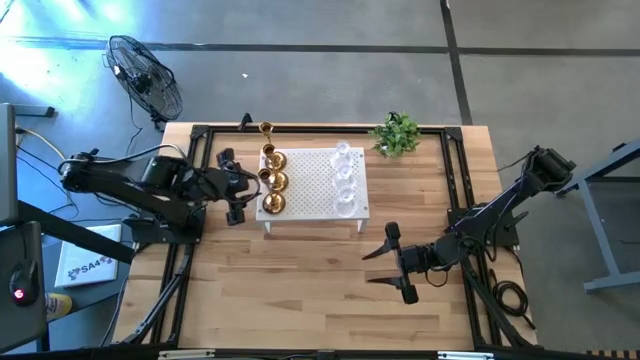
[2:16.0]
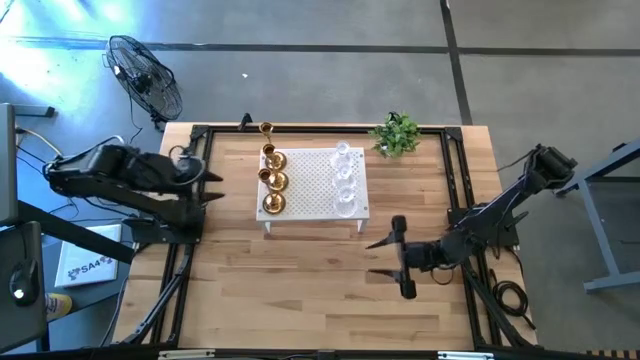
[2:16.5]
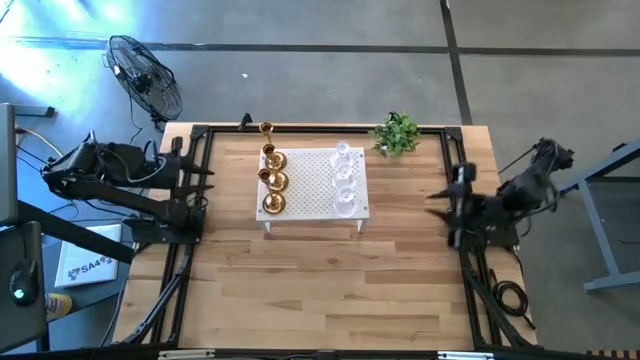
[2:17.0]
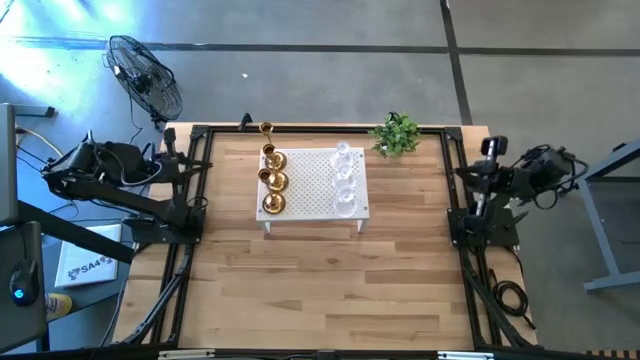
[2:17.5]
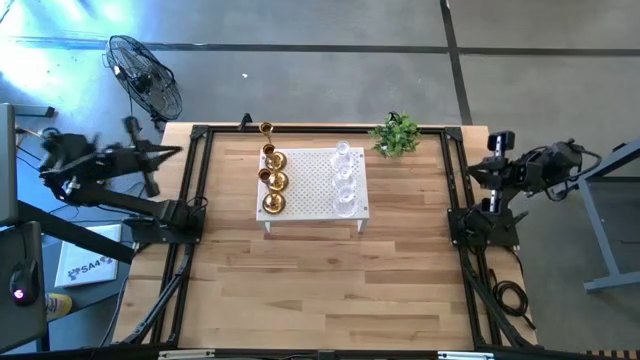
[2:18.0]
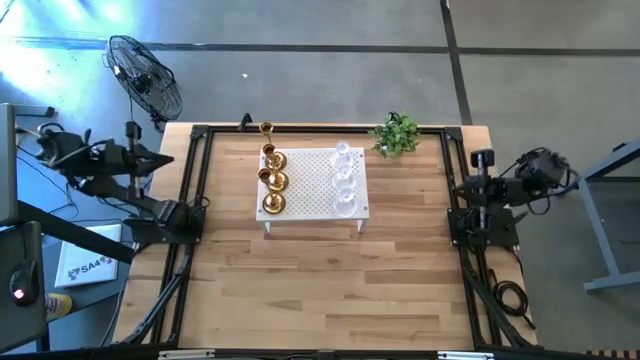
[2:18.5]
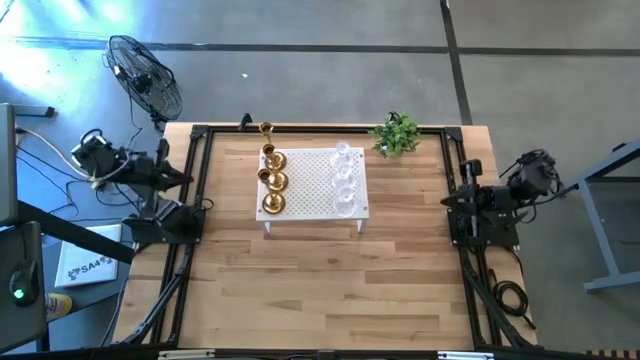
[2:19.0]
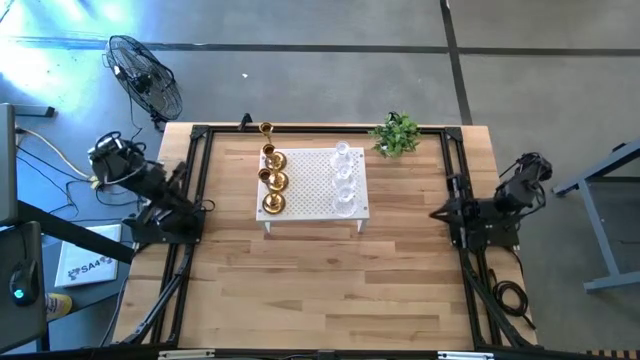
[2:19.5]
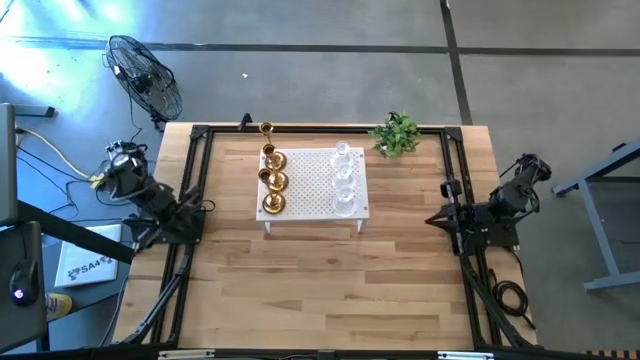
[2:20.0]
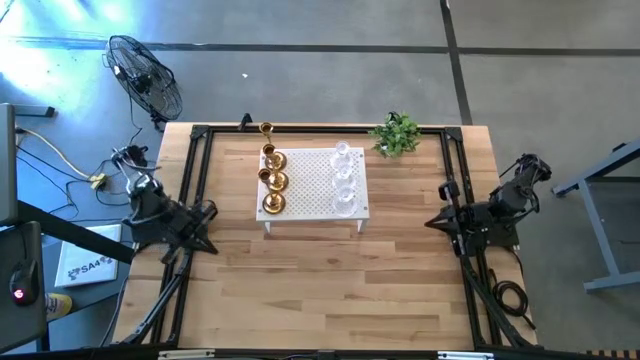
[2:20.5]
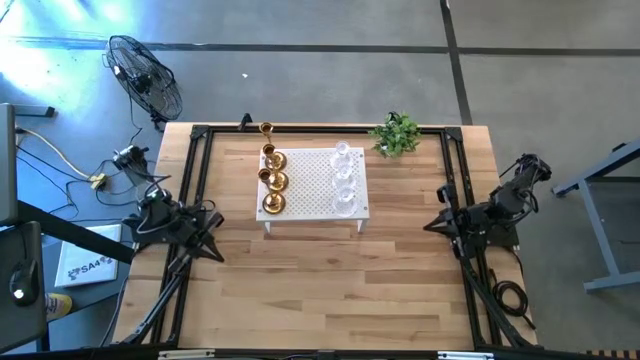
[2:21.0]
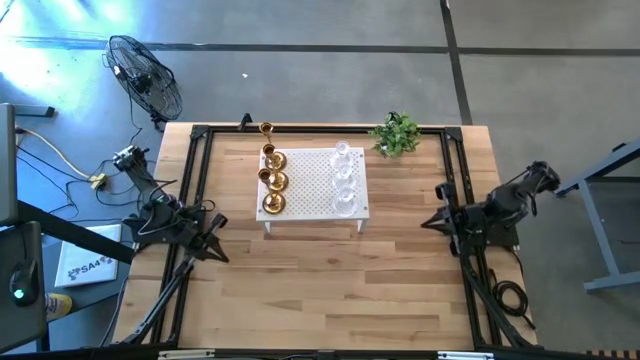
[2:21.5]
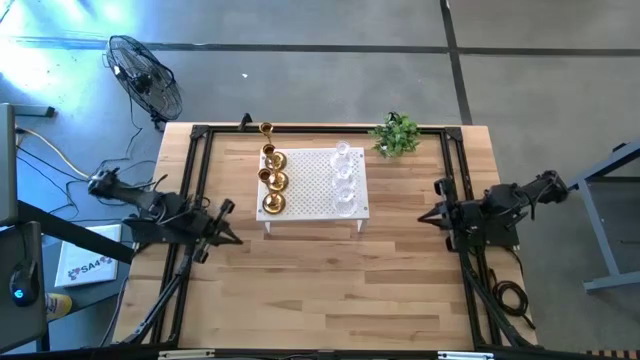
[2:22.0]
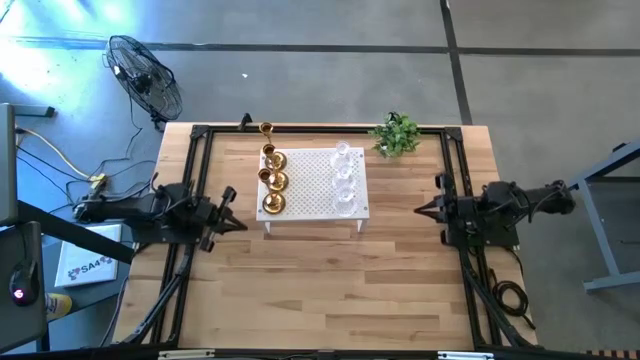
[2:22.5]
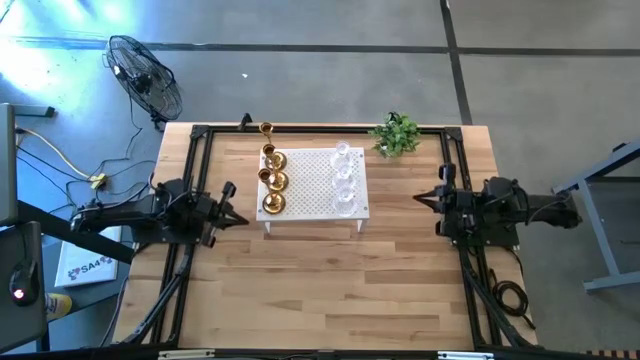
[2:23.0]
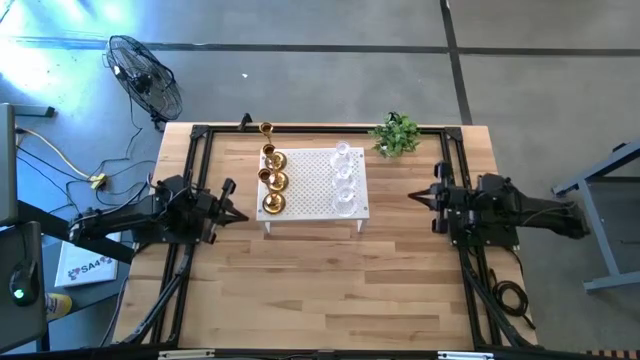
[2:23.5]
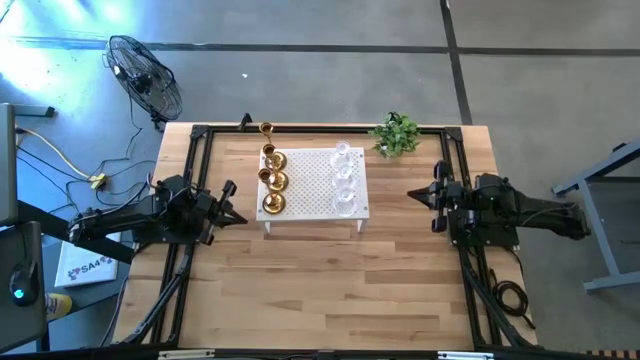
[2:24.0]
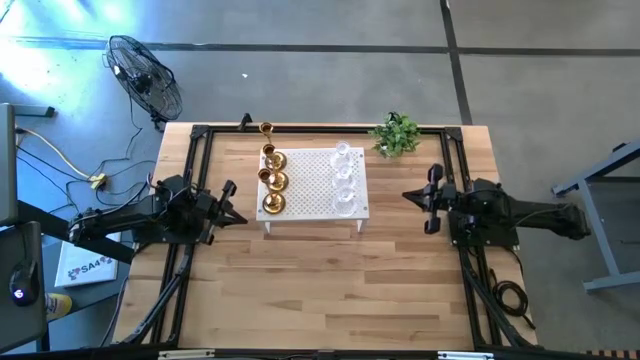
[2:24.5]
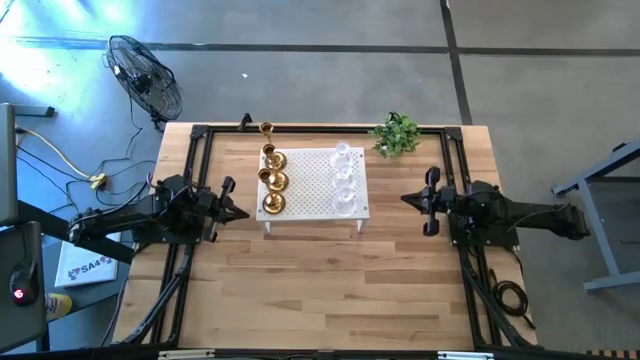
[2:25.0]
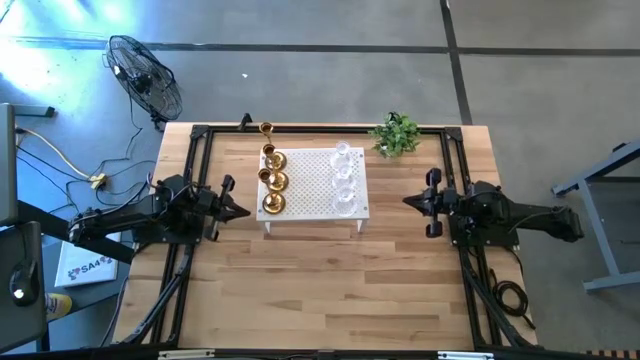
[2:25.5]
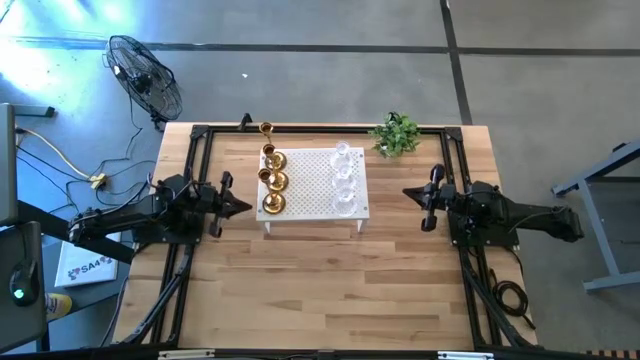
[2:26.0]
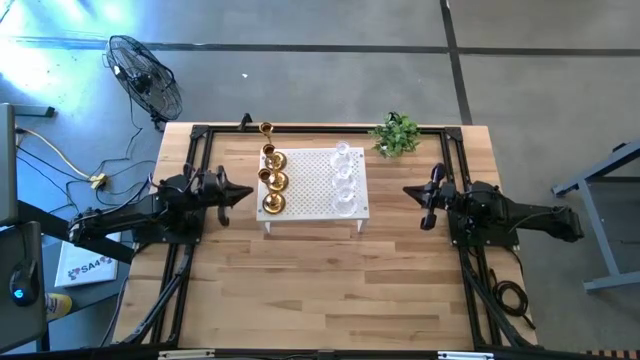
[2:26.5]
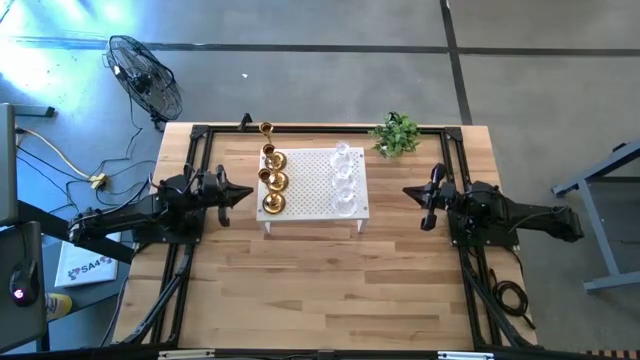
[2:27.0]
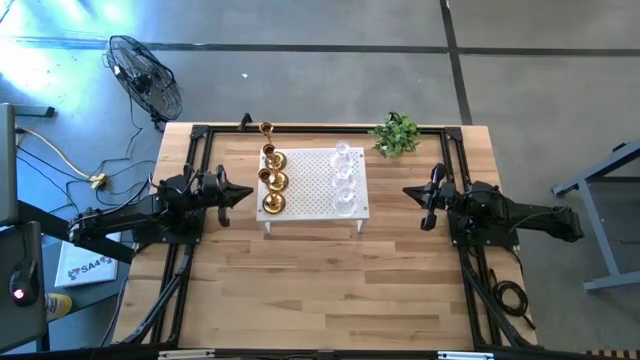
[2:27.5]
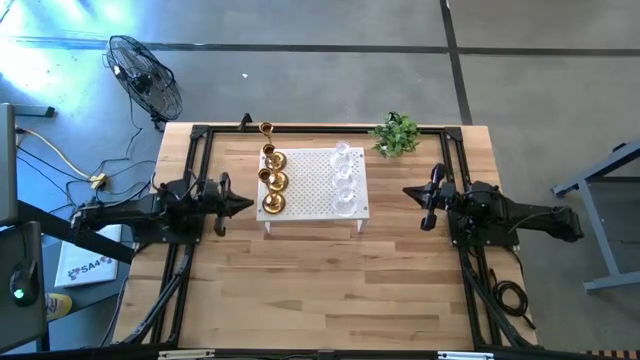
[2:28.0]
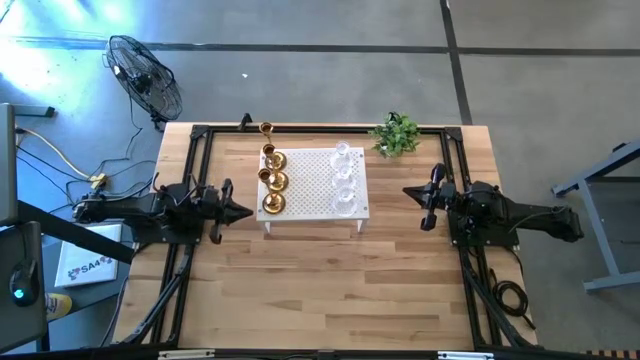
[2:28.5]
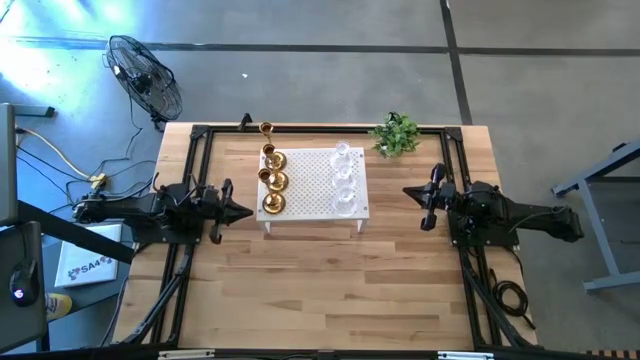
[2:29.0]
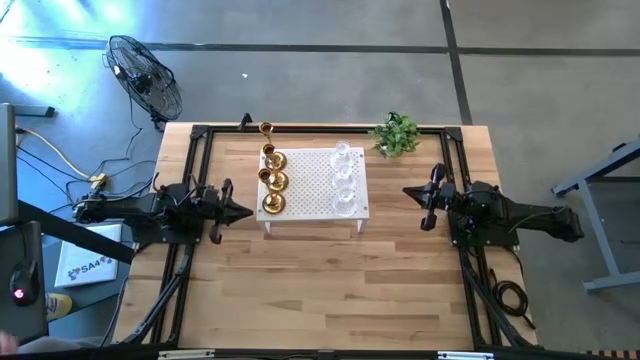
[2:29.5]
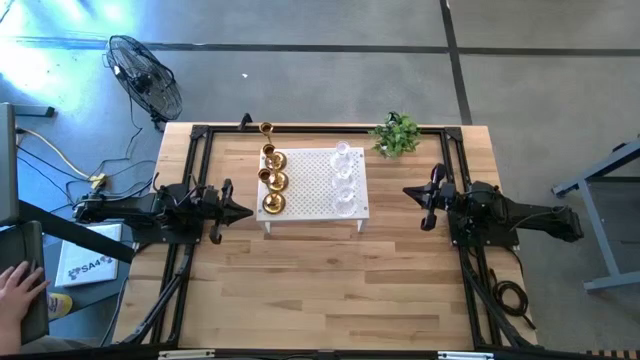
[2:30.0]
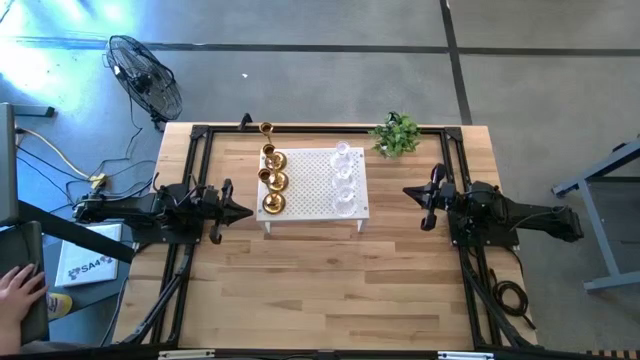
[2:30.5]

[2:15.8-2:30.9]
Task: Pick & Place candle stick holders
Return to Home Position
